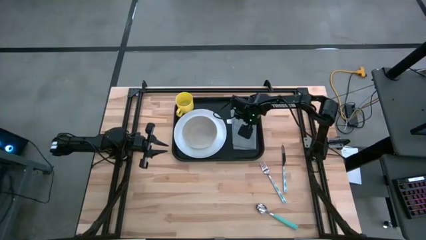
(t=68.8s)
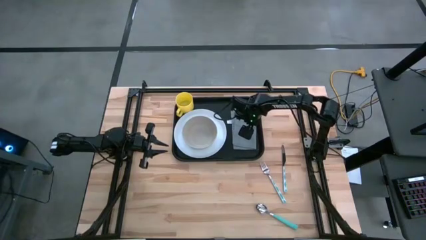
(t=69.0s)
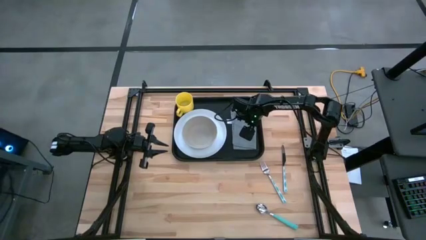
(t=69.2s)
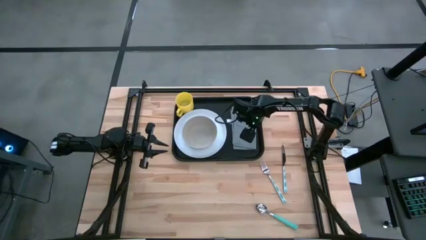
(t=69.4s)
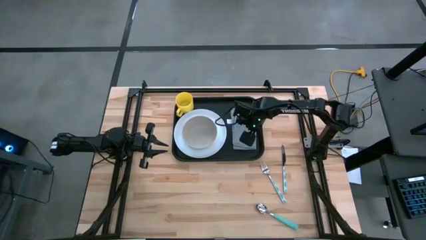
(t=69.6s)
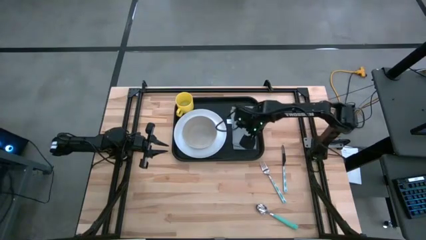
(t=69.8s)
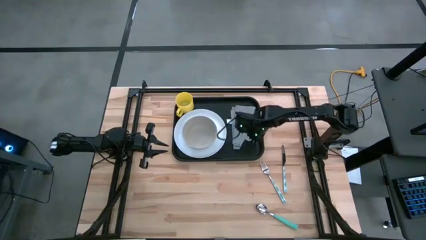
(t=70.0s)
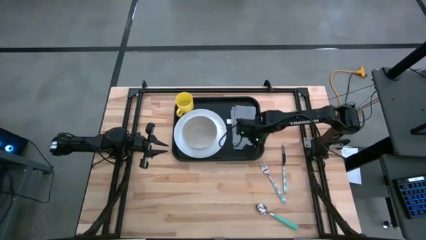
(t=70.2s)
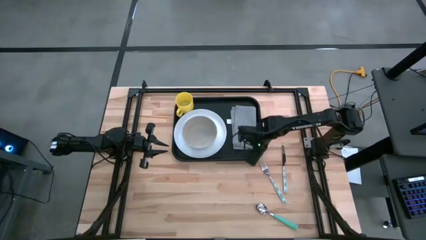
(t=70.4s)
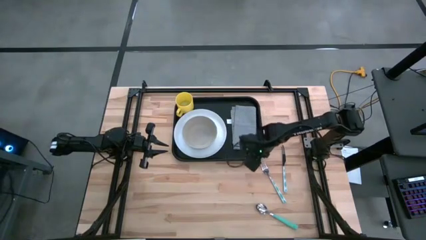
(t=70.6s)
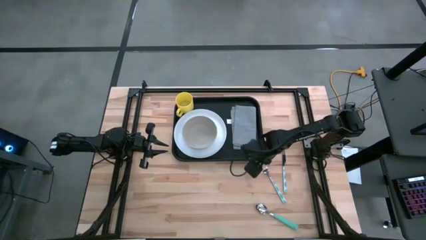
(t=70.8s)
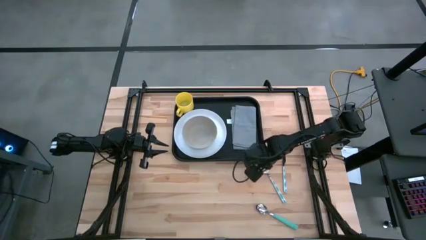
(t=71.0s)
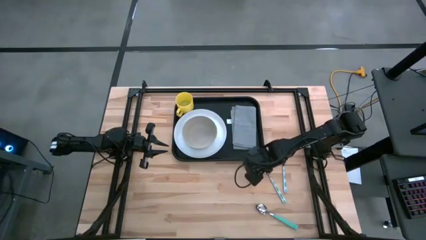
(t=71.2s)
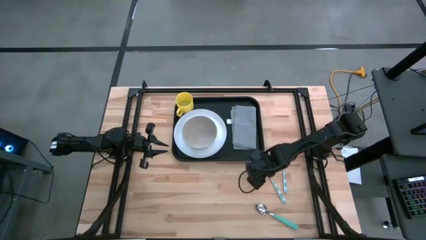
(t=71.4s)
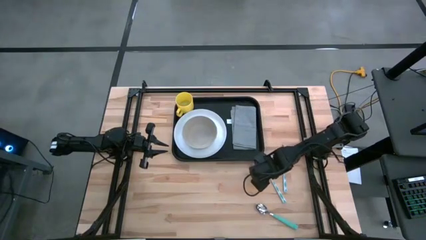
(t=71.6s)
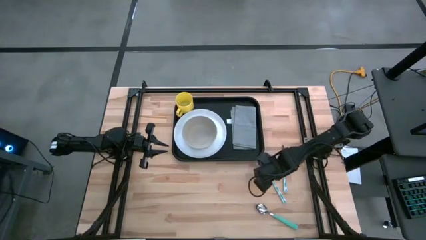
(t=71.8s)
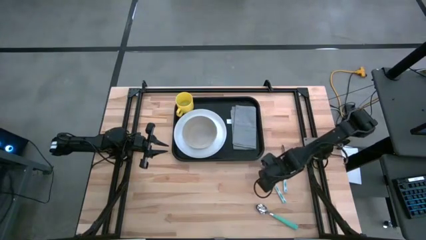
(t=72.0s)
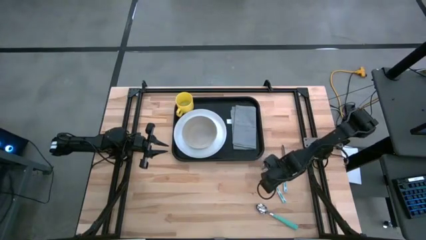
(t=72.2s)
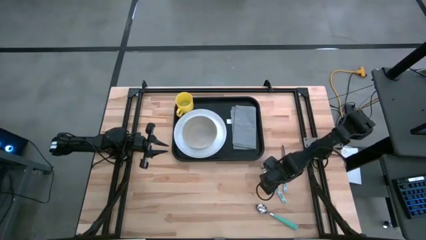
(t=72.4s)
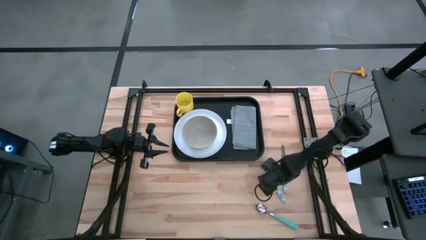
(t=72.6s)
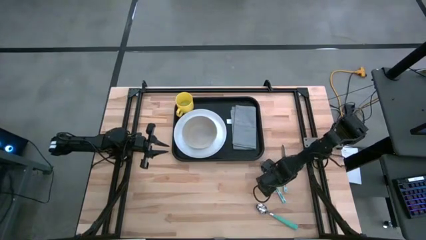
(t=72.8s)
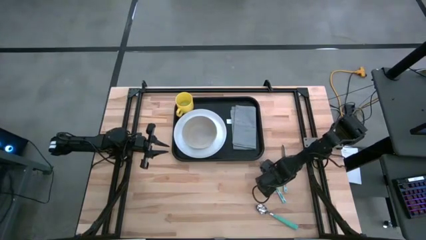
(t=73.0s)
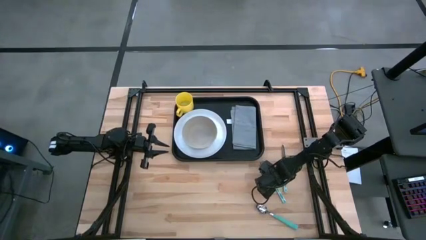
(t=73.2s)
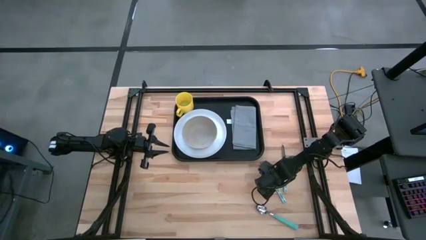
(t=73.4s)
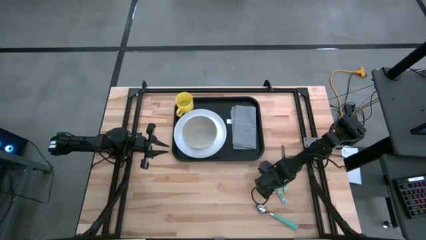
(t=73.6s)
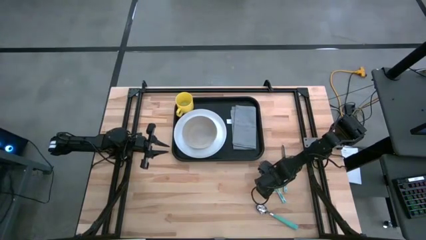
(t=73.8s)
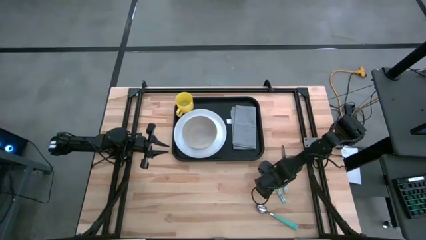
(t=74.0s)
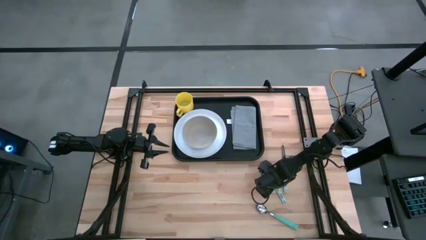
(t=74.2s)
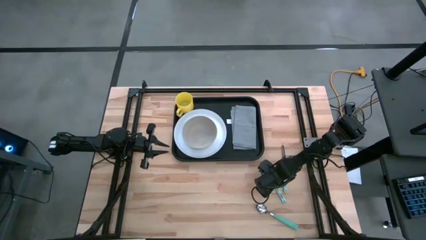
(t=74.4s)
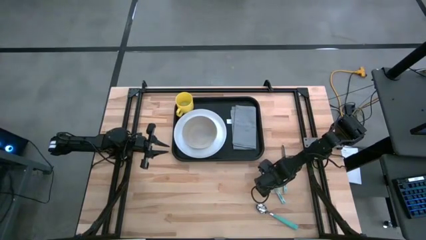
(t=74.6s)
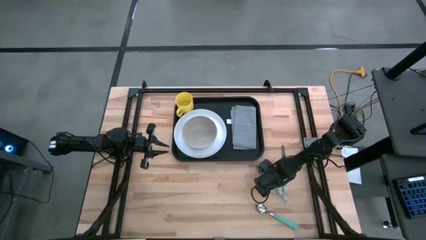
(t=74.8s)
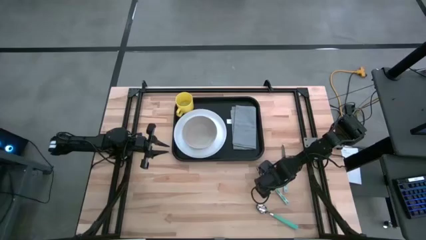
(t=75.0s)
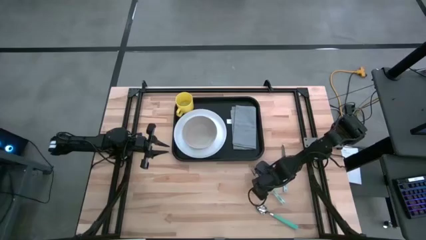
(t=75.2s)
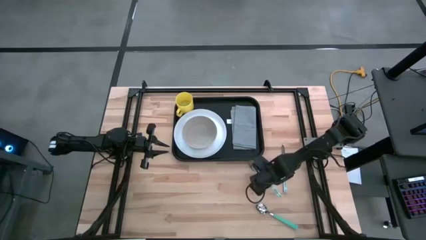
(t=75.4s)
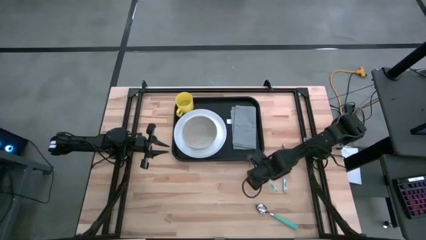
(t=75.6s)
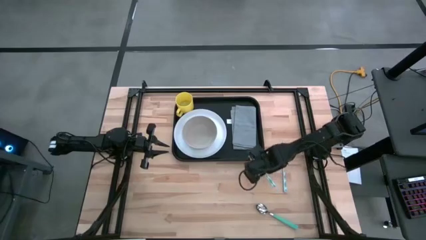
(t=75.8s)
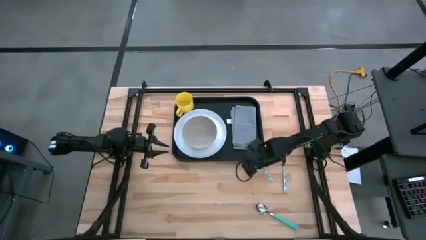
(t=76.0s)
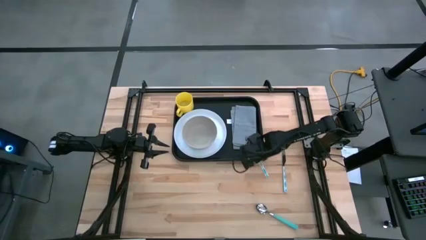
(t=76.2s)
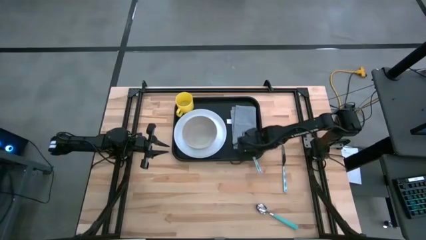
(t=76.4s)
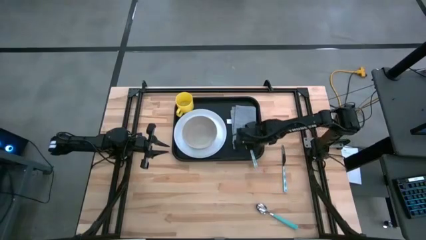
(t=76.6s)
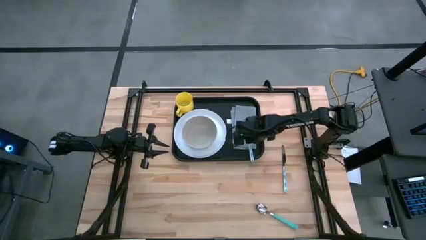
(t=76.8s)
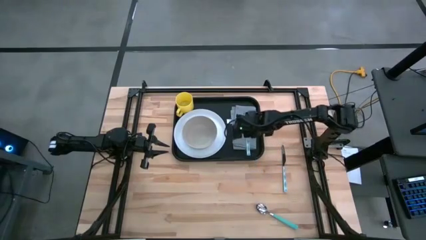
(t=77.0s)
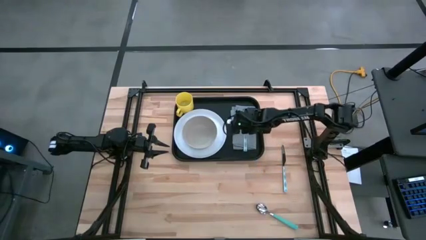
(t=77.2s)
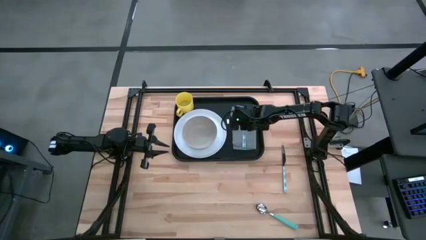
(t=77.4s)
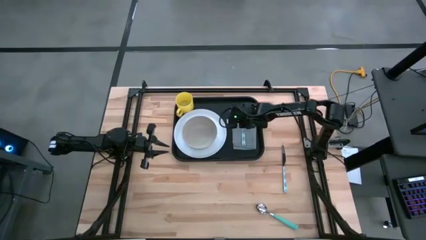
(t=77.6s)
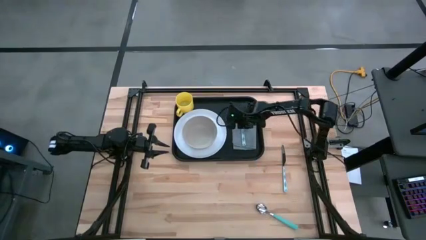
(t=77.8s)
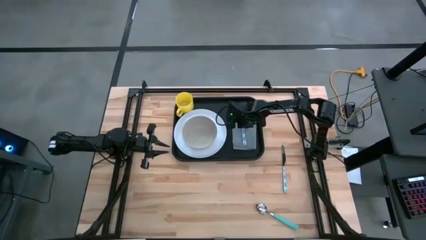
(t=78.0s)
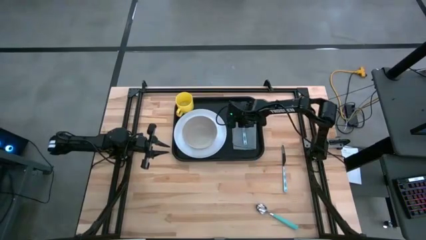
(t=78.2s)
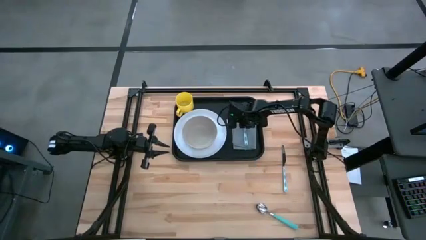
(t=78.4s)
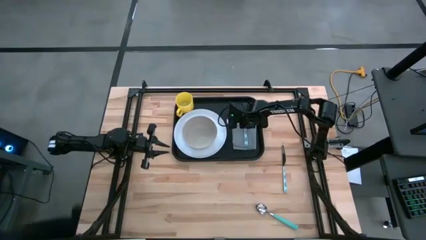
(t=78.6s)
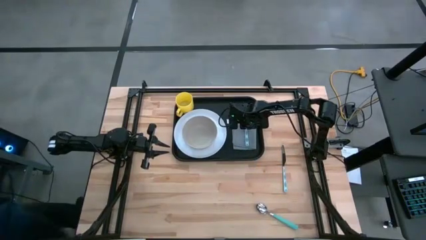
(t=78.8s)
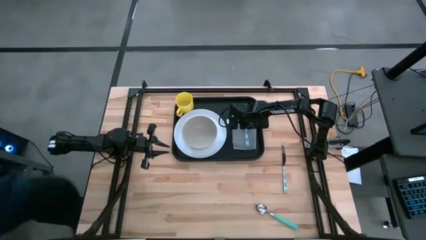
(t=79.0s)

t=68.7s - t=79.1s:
Task: Set up tray
Put the blue fork on the gray napkin to the right of the white plate

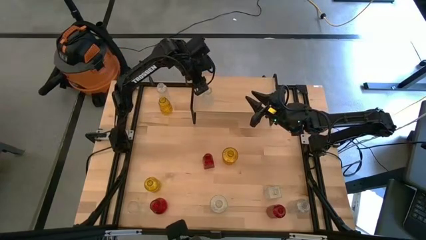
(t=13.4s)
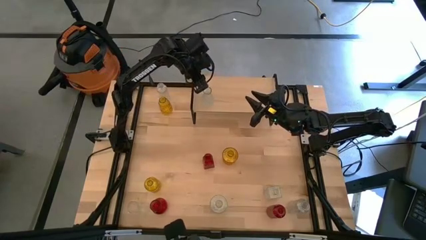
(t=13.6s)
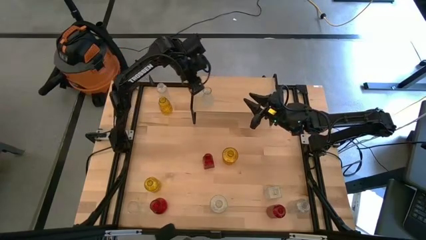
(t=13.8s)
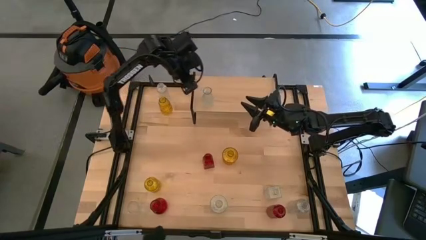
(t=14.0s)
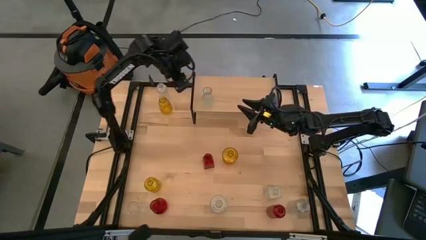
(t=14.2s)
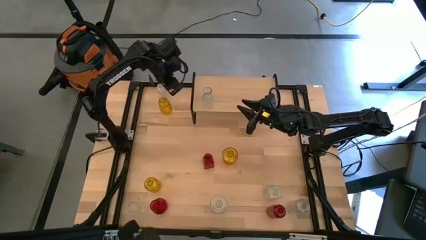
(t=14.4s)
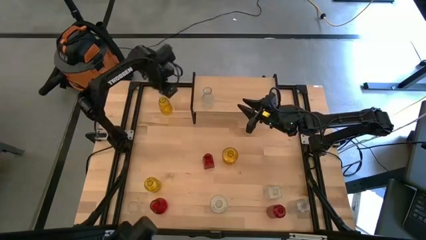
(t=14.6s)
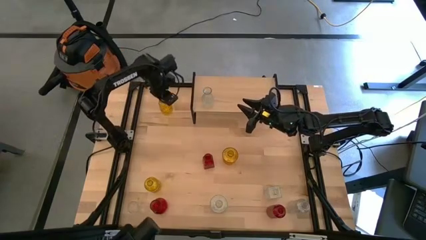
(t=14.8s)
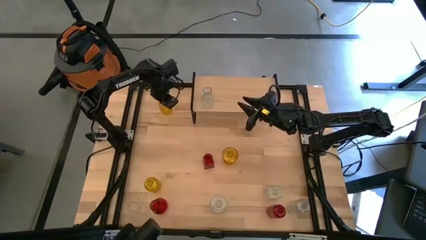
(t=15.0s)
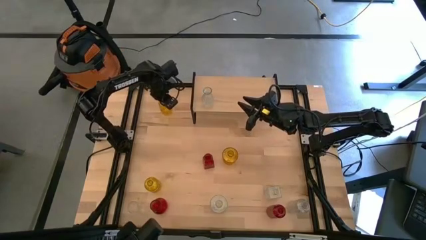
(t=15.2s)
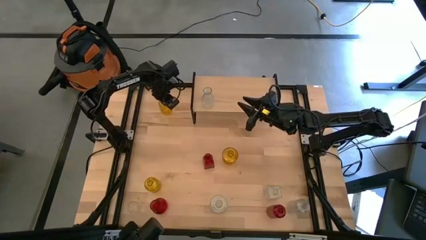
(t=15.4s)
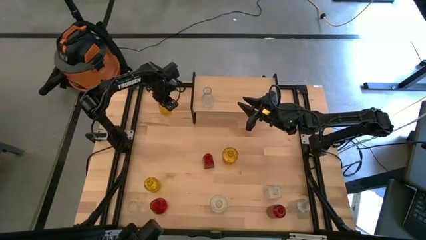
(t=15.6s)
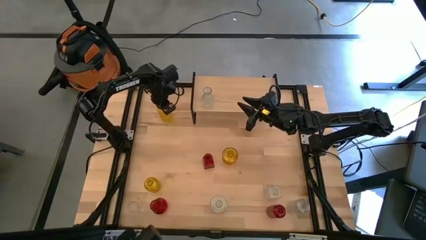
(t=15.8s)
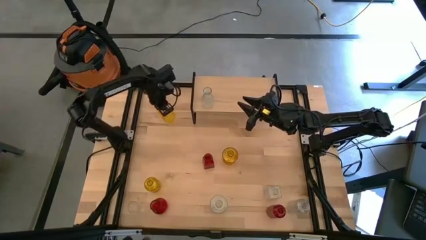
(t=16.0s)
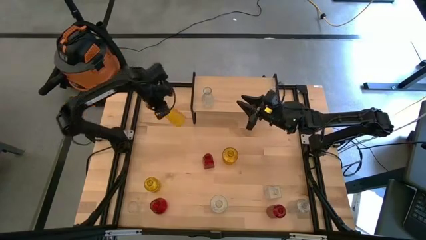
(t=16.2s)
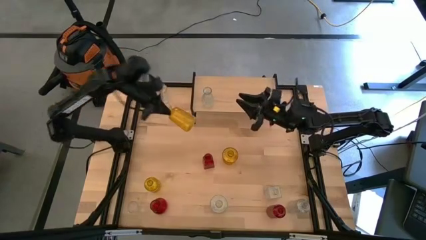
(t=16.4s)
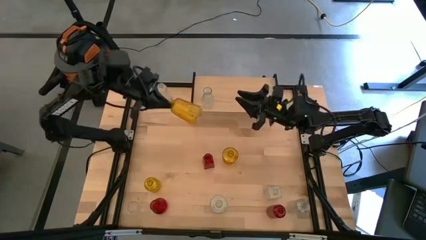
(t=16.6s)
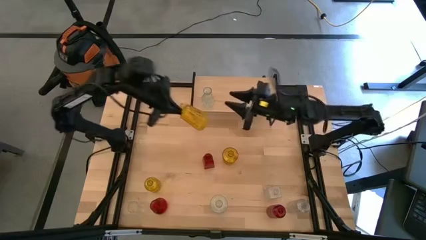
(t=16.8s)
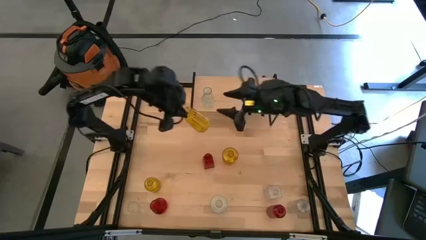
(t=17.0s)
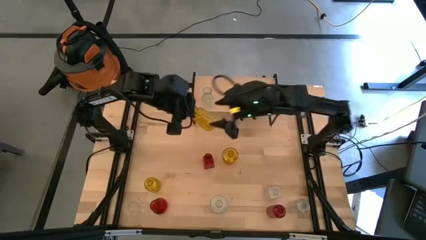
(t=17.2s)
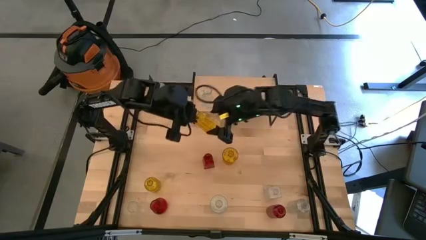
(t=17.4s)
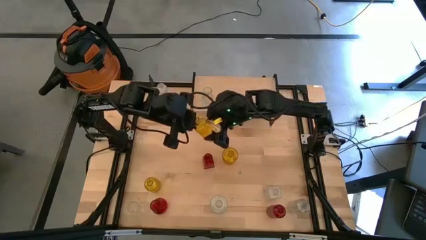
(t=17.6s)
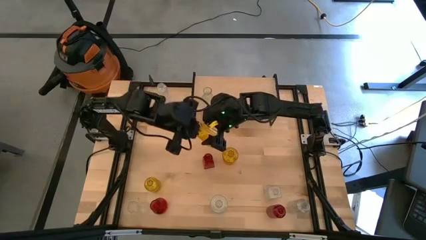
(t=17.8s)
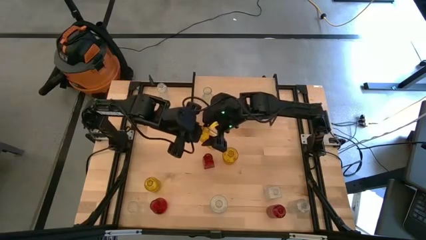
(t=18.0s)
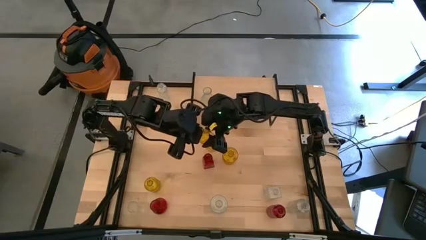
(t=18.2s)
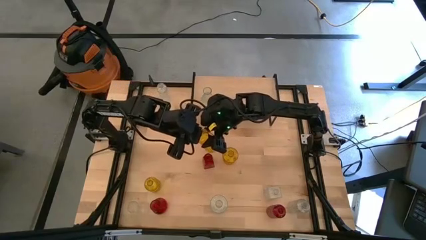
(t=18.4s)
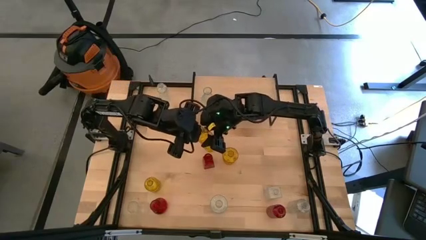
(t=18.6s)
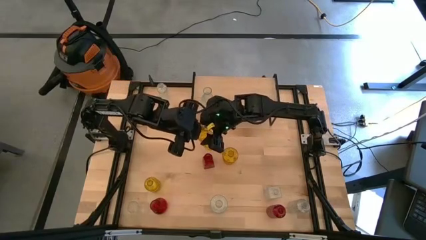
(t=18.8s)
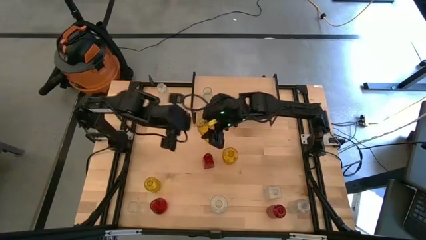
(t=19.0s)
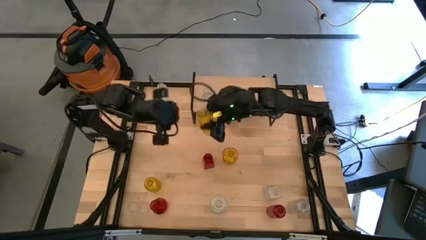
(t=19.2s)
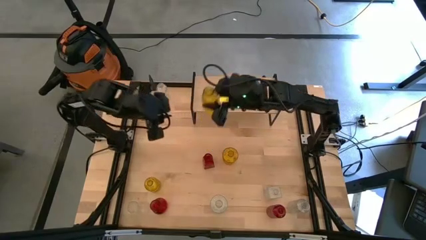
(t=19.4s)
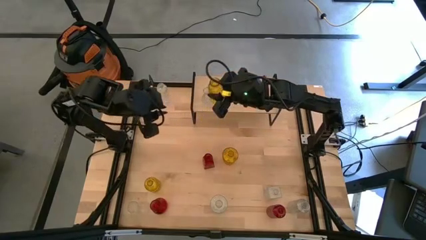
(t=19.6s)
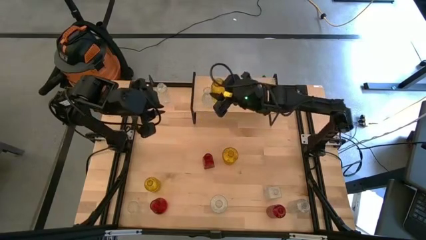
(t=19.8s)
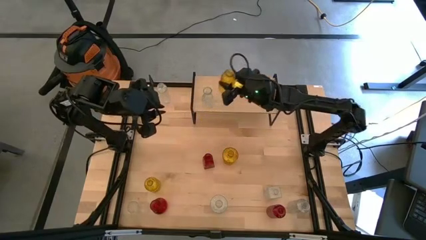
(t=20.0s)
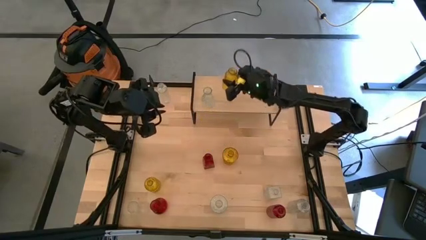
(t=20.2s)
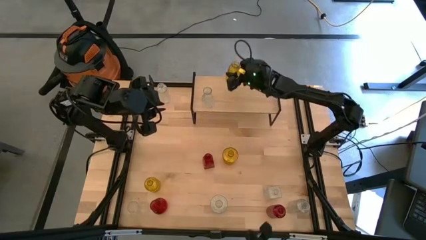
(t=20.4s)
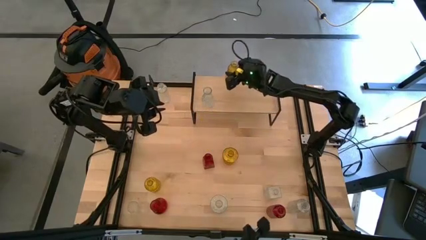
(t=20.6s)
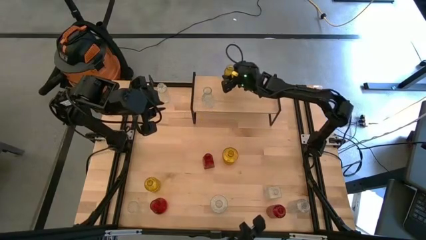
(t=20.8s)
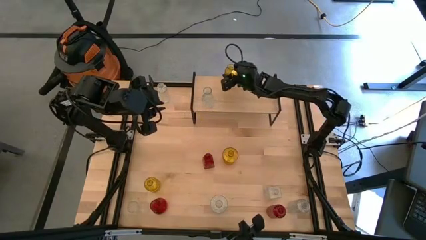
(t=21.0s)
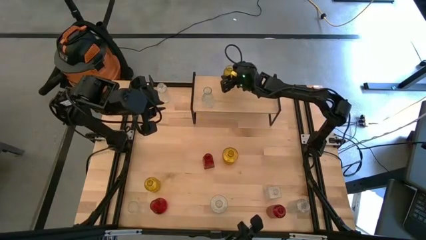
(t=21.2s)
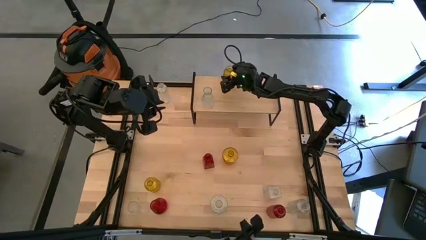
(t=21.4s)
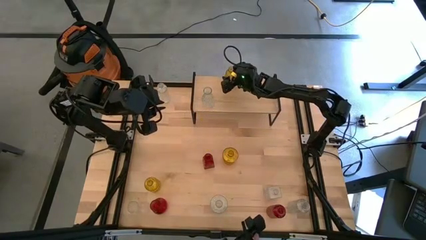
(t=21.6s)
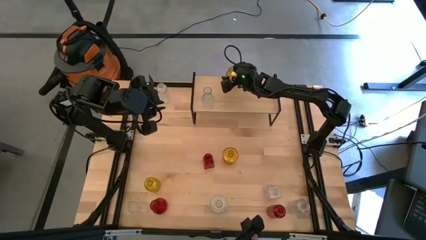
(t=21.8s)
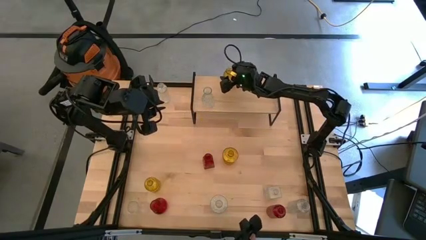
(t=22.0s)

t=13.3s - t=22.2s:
Task: sort vases onto shelf
Put the yellow vase on the shelf
